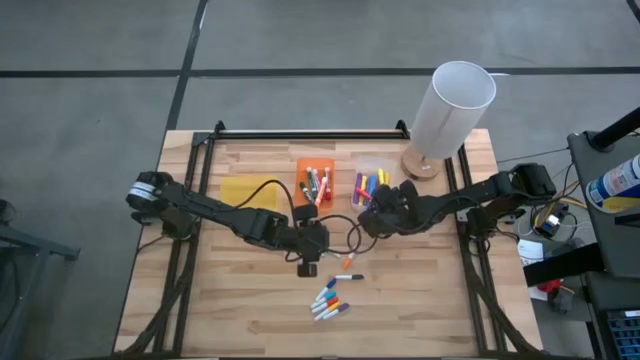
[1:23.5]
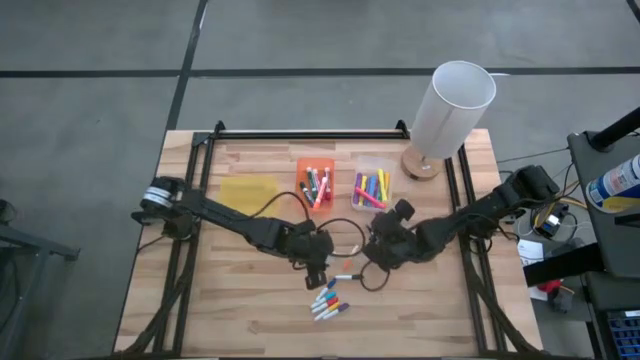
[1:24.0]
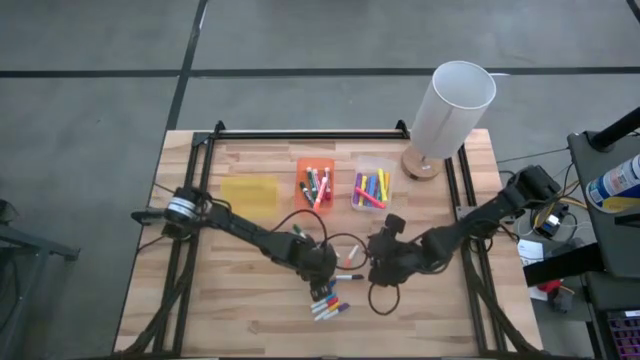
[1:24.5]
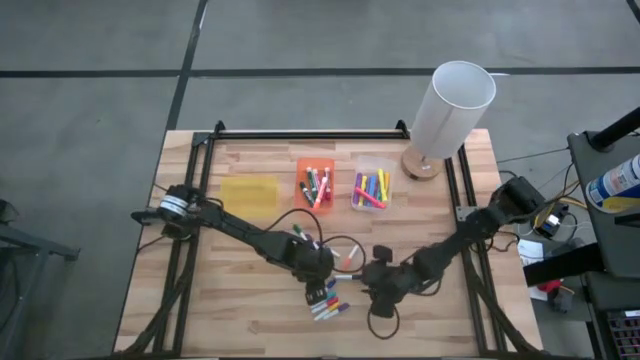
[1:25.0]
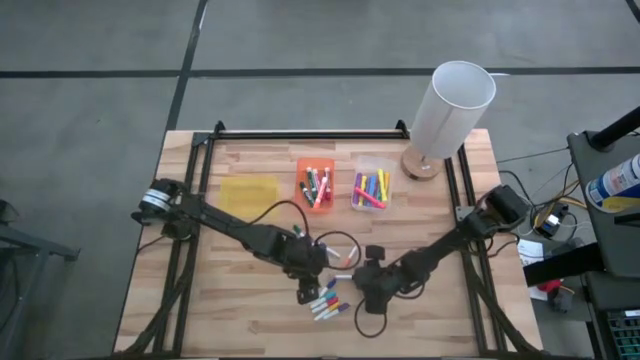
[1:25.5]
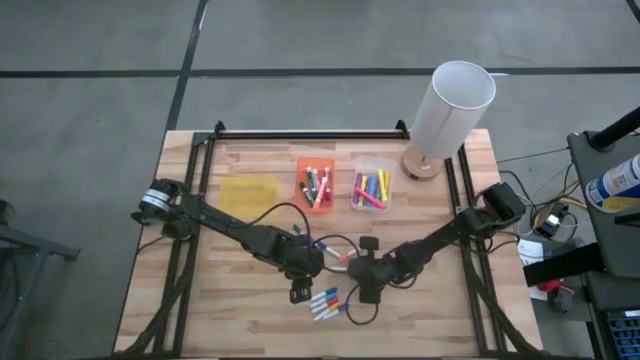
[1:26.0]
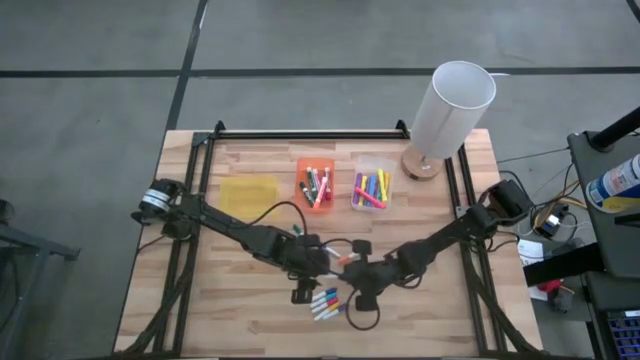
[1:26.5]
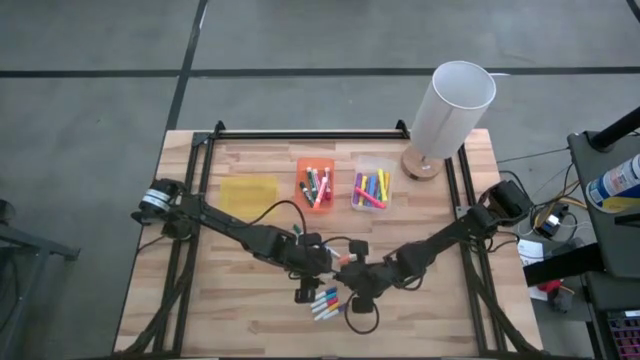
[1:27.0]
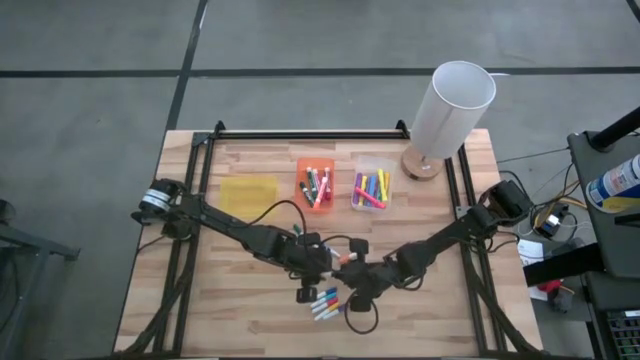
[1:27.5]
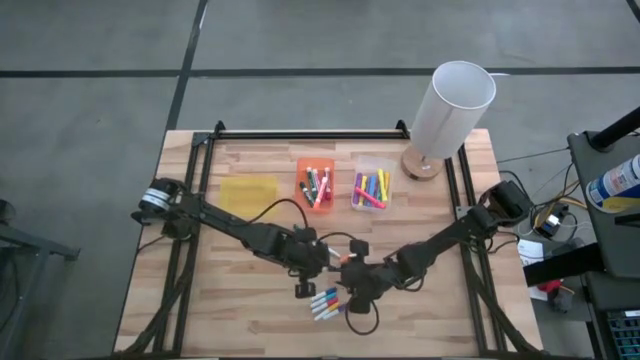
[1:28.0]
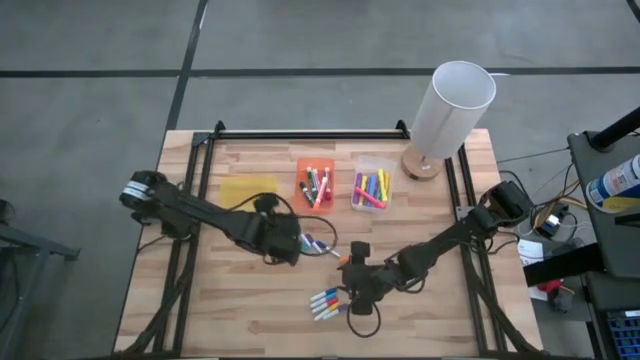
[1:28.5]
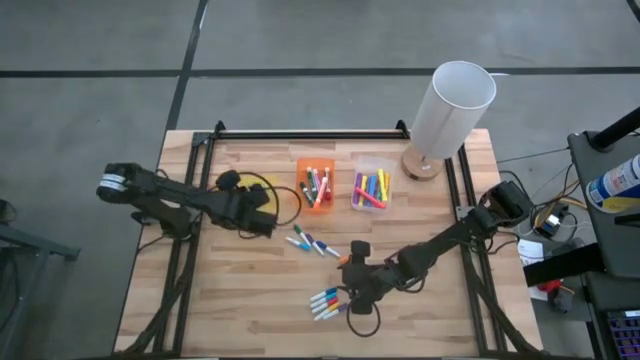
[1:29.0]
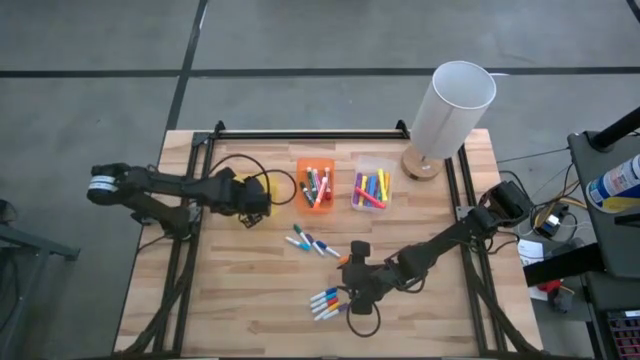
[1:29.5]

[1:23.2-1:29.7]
Task: Pick & Place Markers
Put the small black marker into the yellow bin

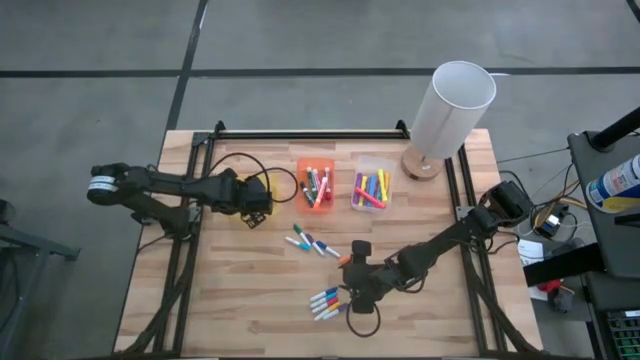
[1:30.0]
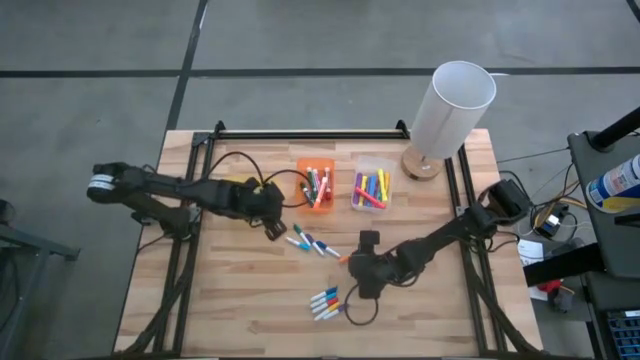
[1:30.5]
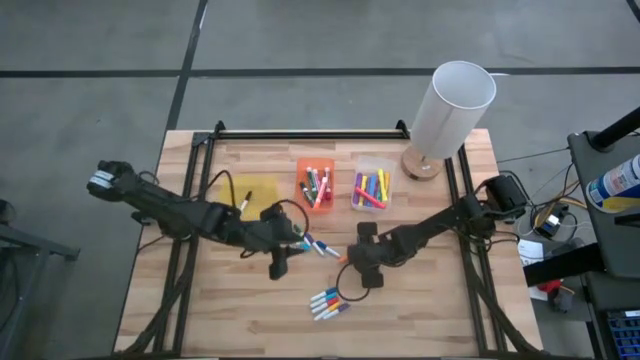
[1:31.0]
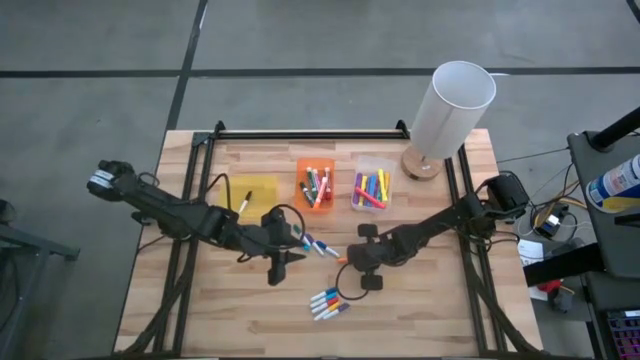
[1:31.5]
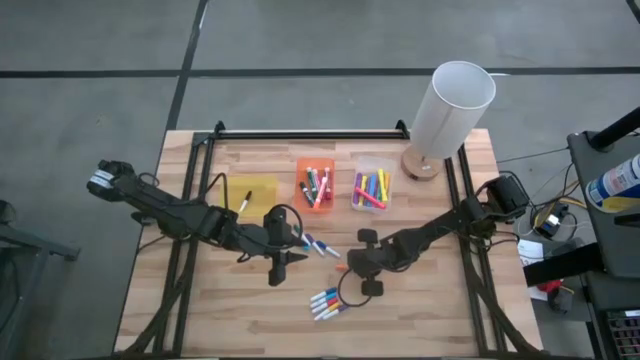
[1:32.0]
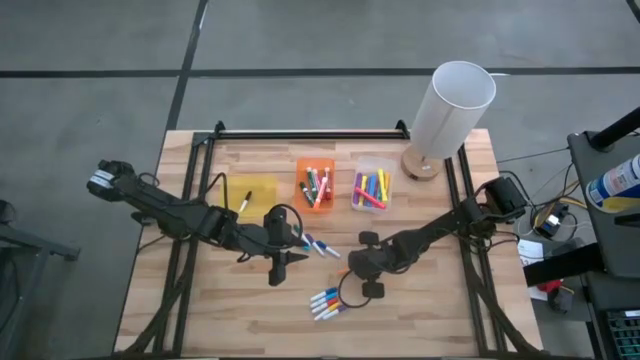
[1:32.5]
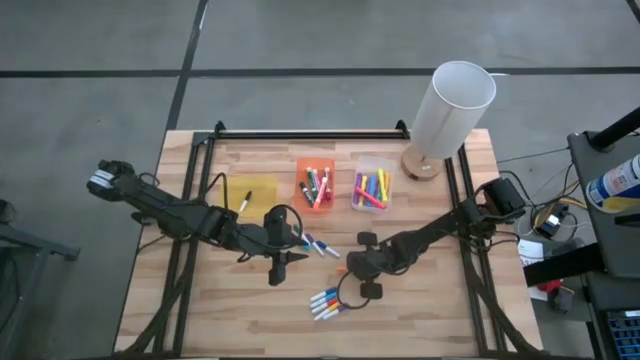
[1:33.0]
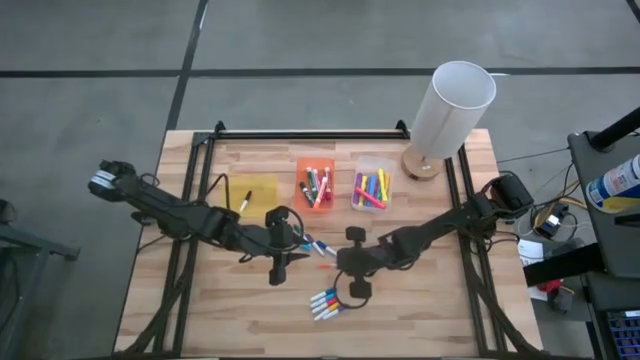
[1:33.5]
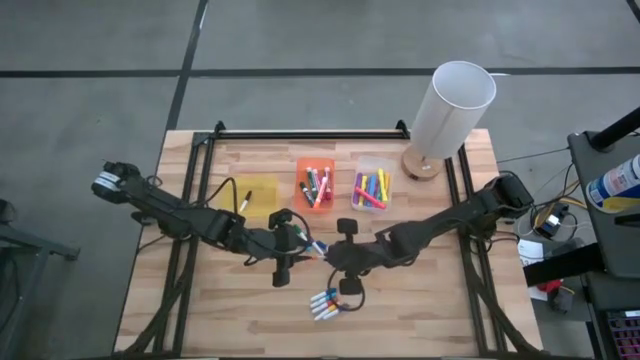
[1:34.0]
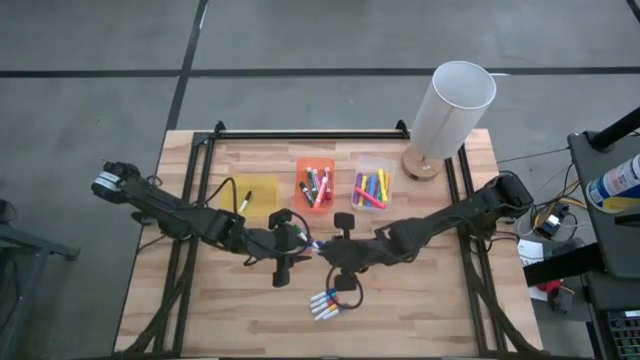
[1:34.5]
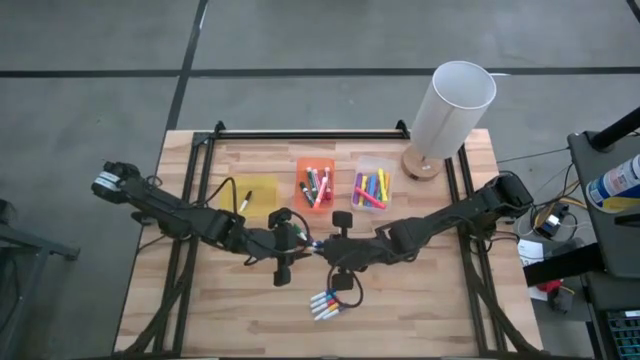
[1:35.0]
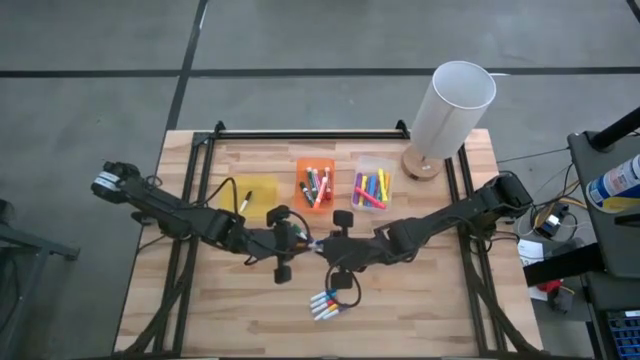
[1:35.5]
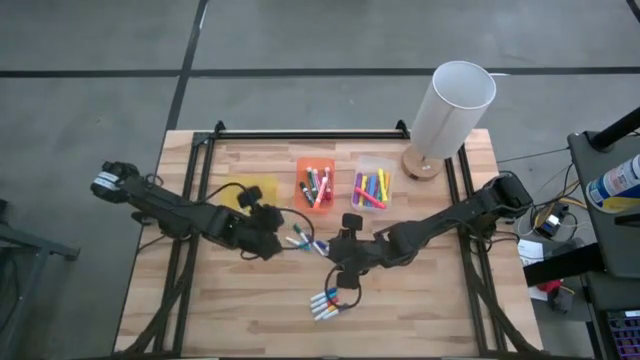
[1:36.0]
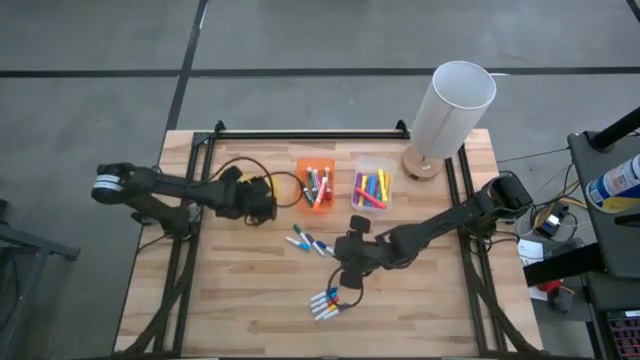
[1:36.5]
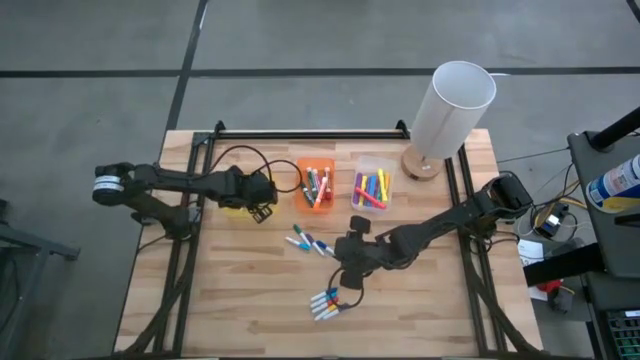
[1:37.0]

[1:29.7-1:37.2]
Put the small orange marker into the yellow bin

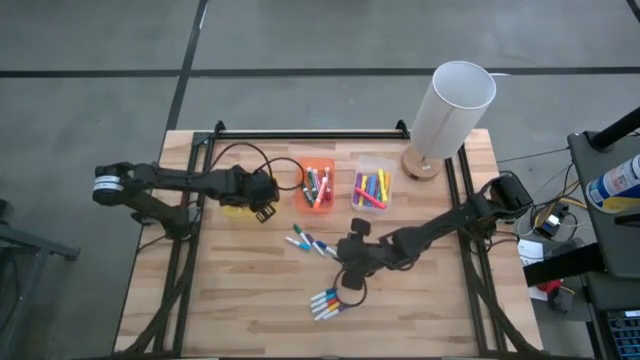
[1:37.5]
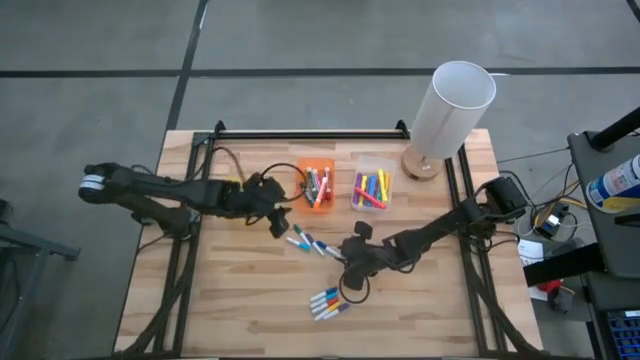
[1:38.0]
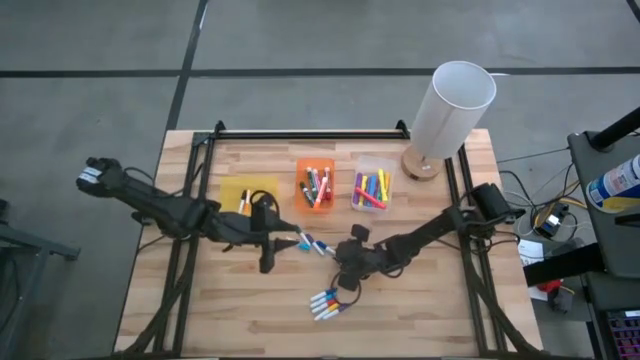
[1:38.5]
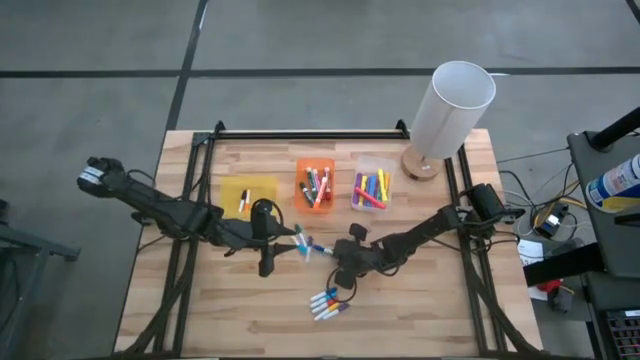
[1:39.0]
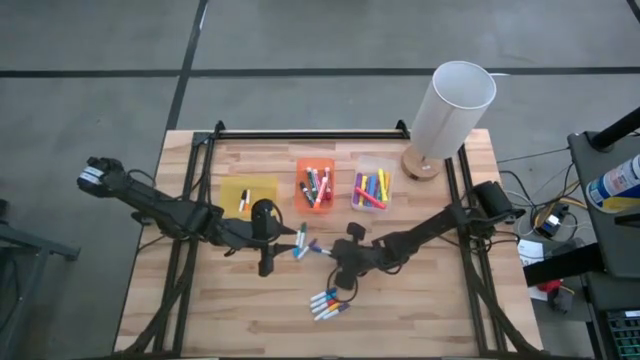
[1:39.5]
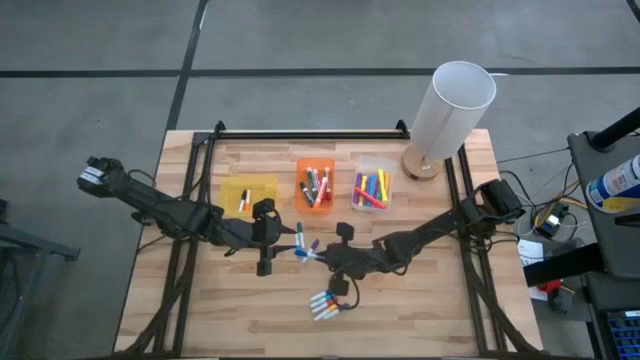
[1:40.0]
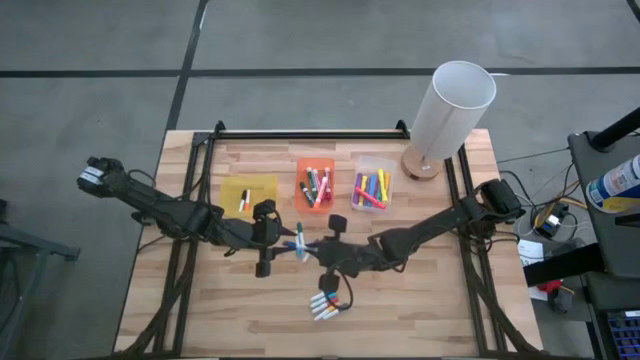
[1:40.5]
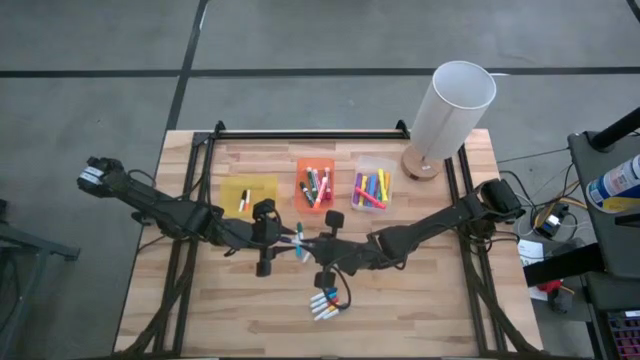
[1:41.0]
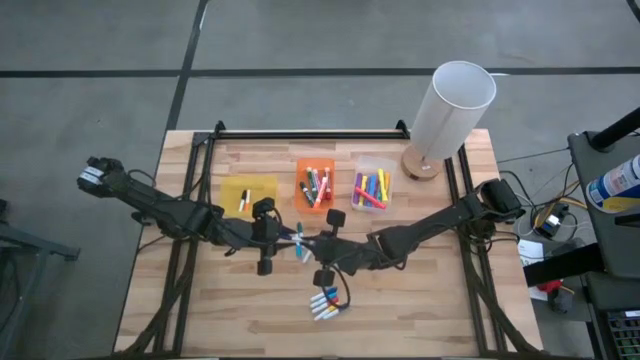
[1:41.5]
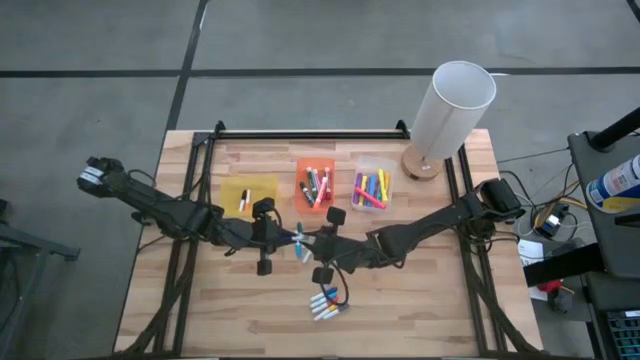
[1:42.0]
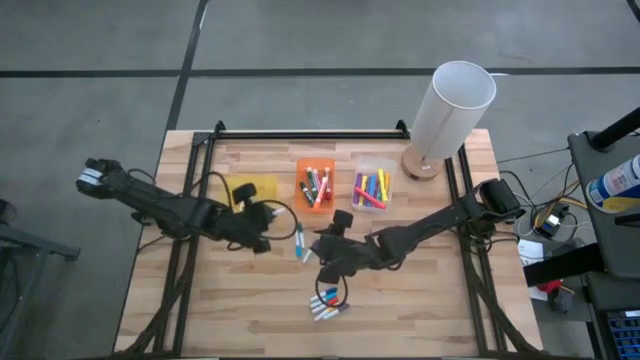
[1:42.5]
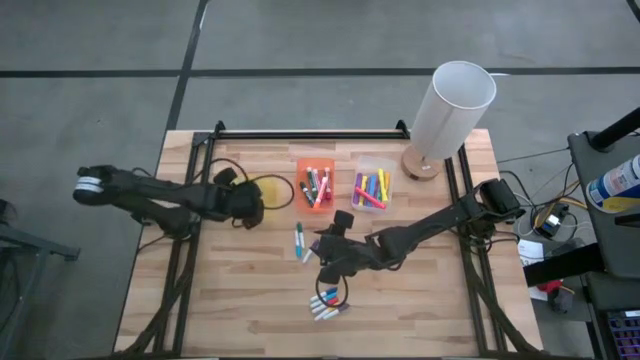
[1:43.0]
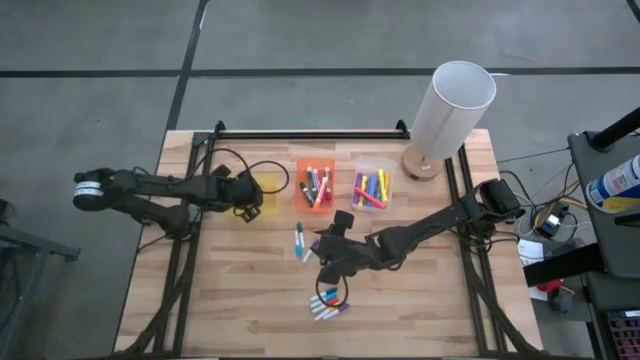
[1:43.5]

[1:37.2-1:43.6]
Put the small blue marker into the transparent yellow bin

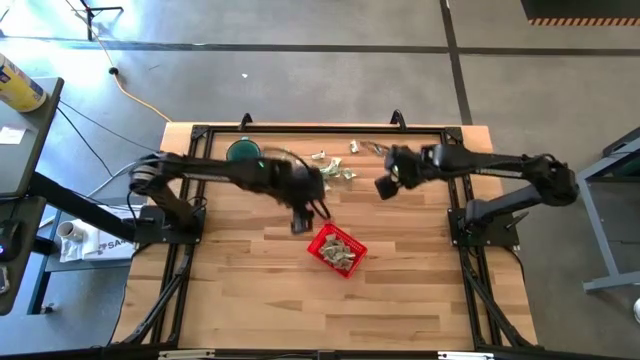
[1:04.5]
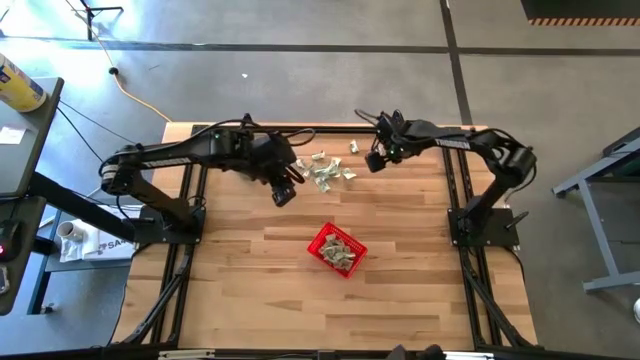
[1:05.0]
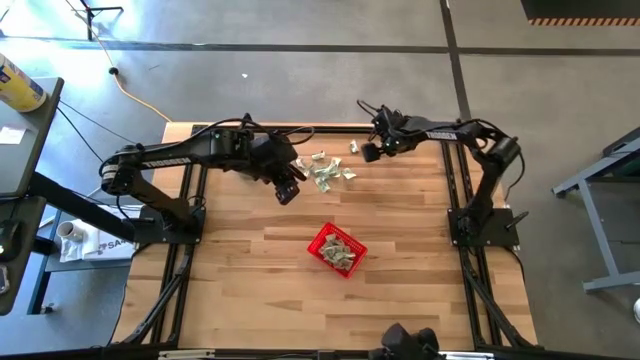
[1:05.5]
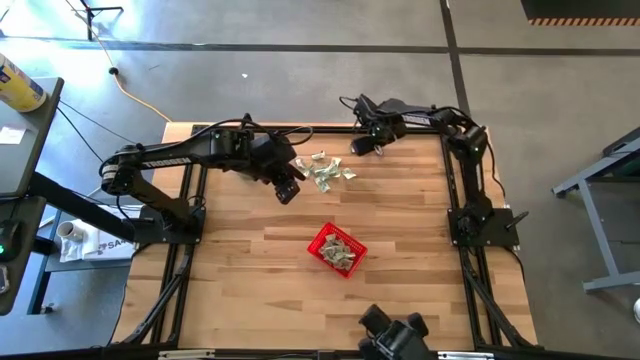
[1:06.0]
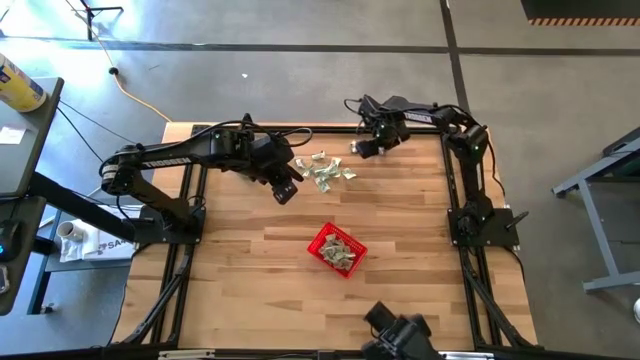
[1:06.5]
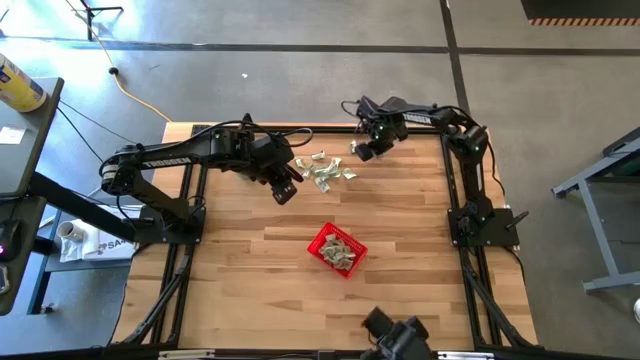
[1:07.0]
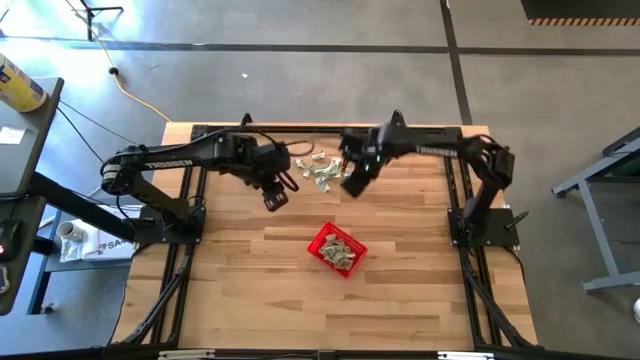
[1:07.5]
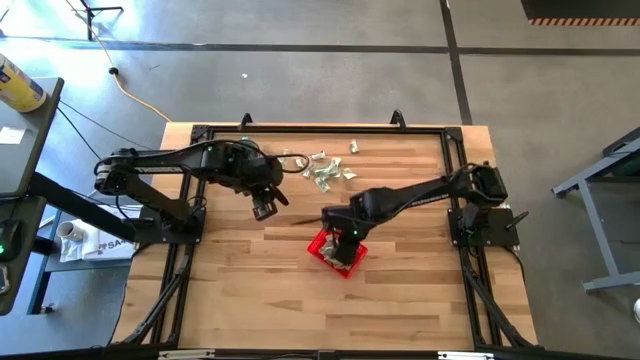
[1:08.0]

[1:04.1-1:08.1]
Task: Pick and place Stevia / Truvia into bins
Put the green stevia packet into the bin
